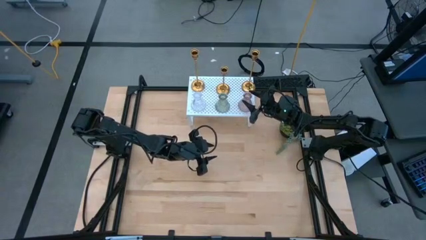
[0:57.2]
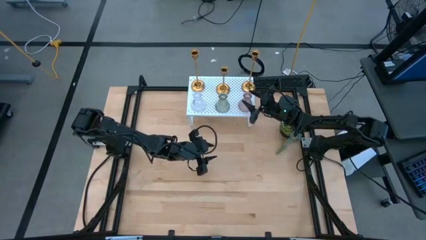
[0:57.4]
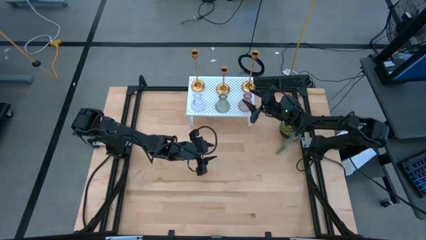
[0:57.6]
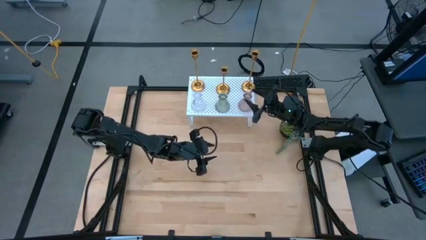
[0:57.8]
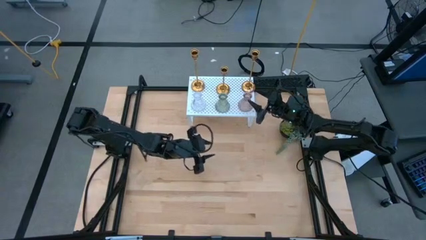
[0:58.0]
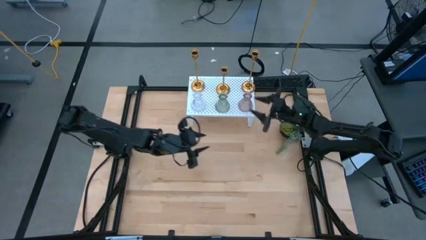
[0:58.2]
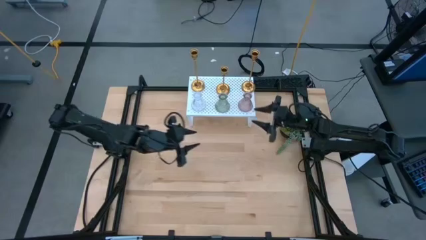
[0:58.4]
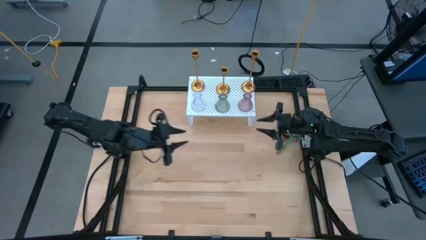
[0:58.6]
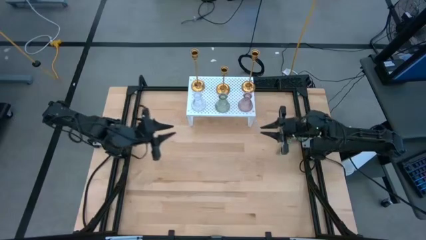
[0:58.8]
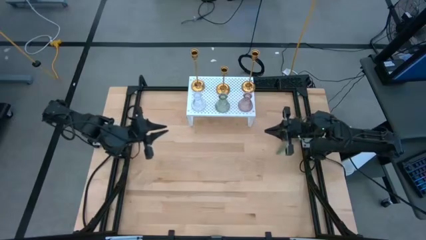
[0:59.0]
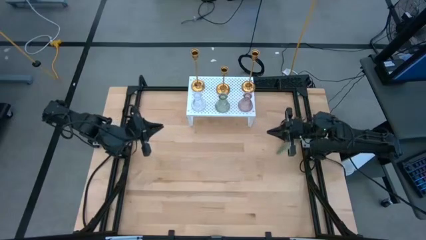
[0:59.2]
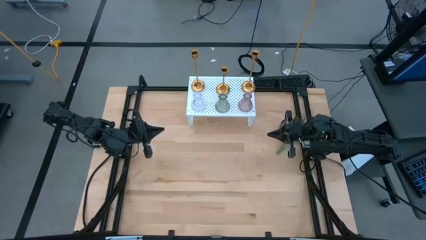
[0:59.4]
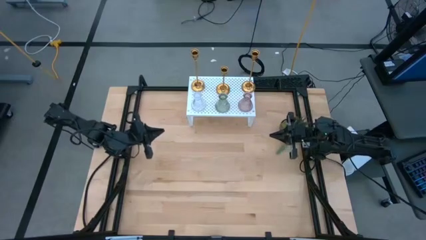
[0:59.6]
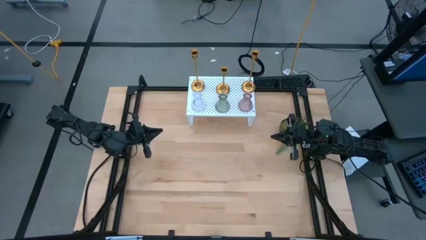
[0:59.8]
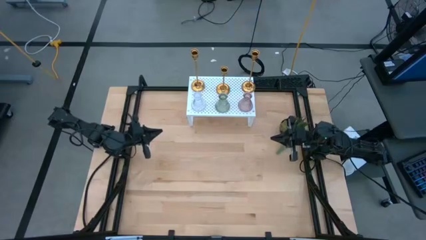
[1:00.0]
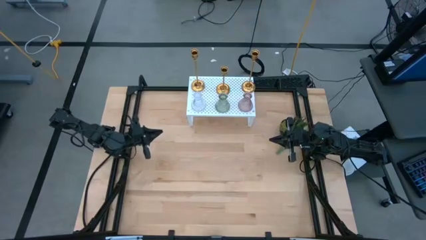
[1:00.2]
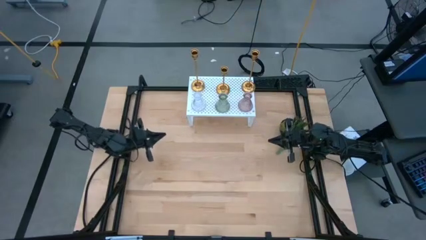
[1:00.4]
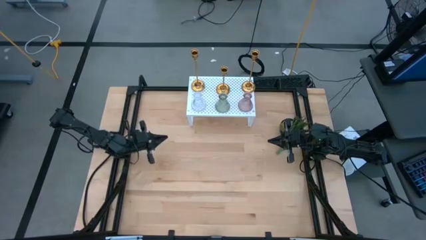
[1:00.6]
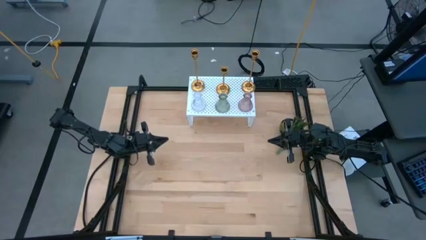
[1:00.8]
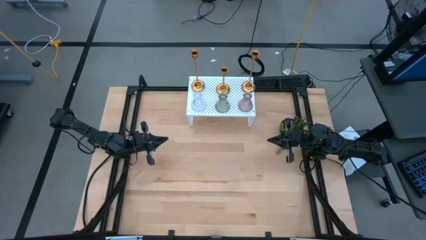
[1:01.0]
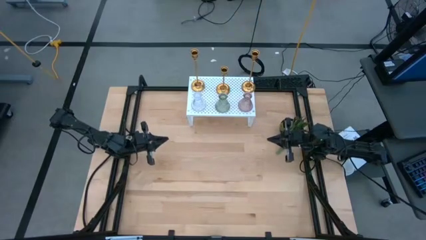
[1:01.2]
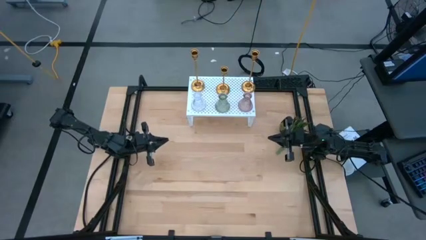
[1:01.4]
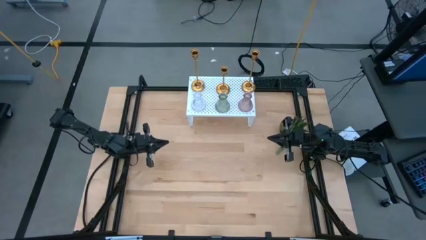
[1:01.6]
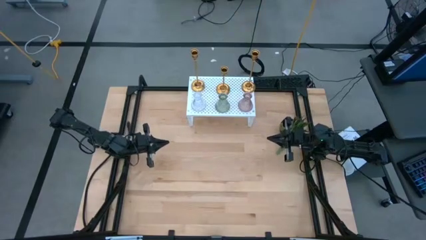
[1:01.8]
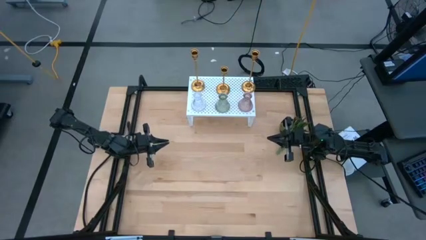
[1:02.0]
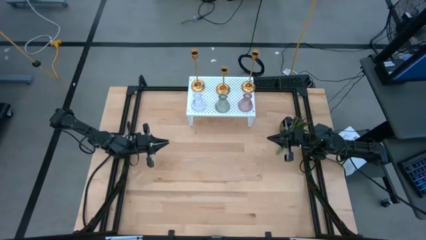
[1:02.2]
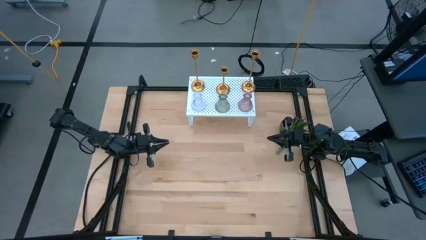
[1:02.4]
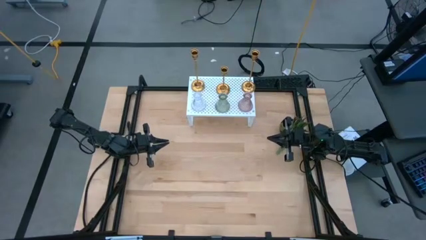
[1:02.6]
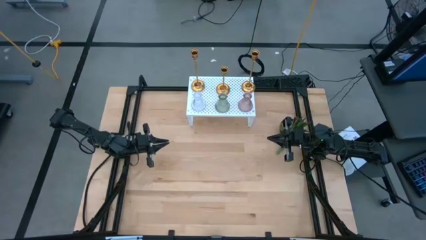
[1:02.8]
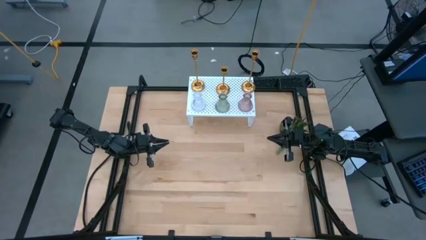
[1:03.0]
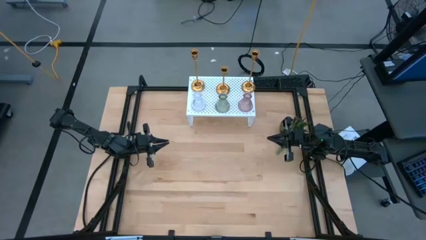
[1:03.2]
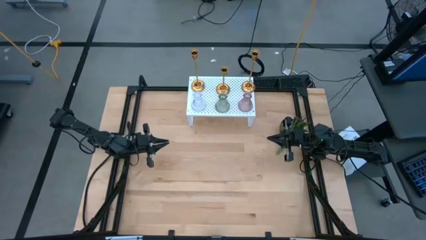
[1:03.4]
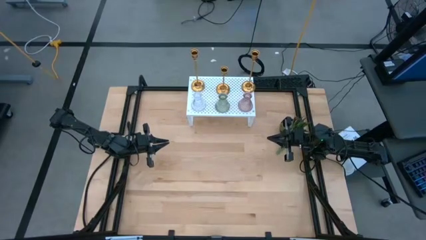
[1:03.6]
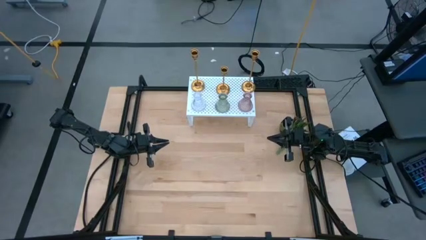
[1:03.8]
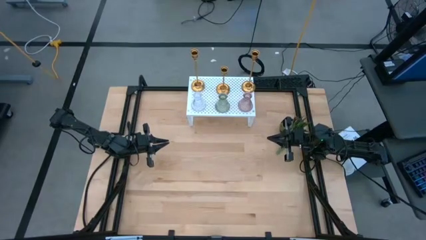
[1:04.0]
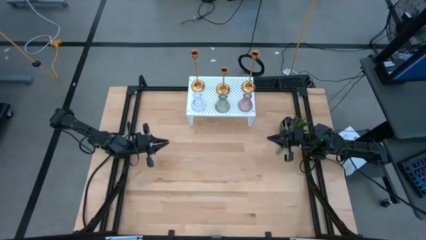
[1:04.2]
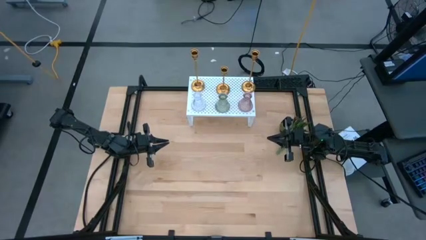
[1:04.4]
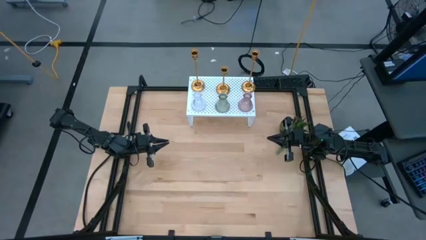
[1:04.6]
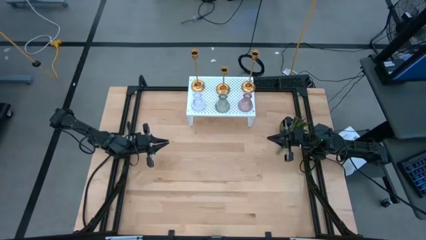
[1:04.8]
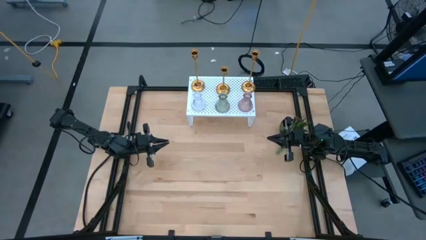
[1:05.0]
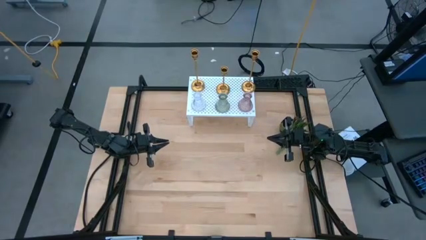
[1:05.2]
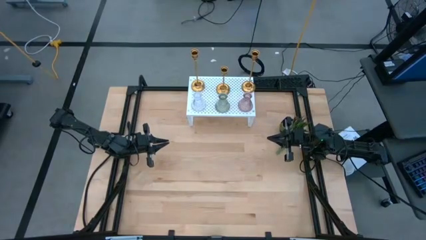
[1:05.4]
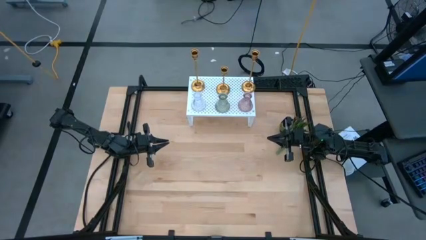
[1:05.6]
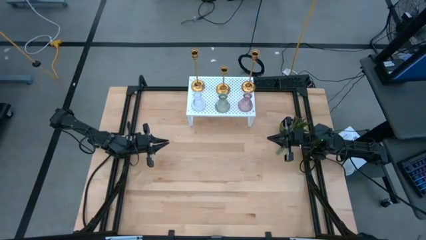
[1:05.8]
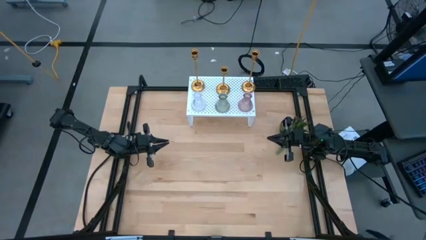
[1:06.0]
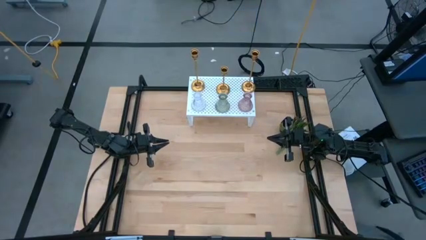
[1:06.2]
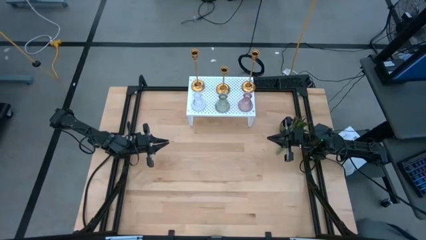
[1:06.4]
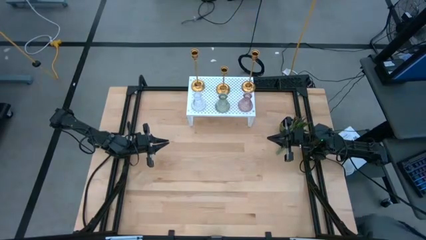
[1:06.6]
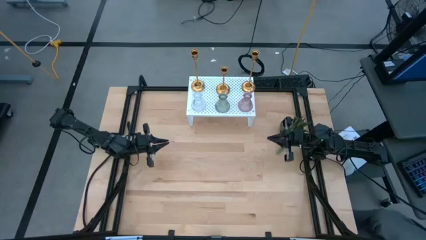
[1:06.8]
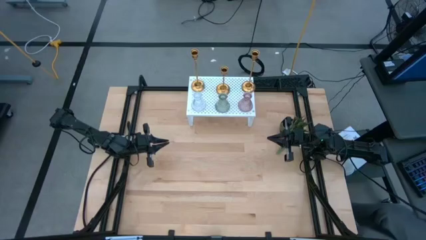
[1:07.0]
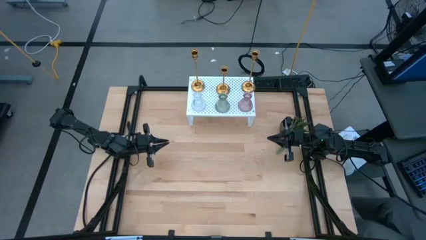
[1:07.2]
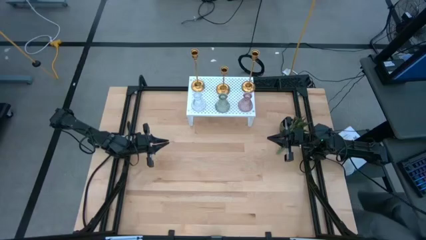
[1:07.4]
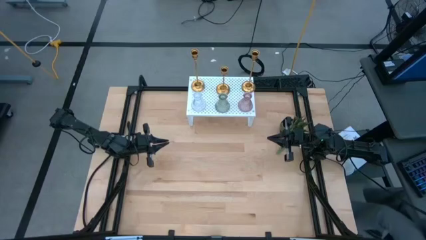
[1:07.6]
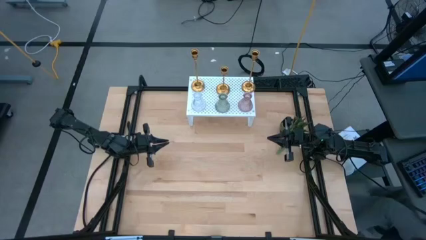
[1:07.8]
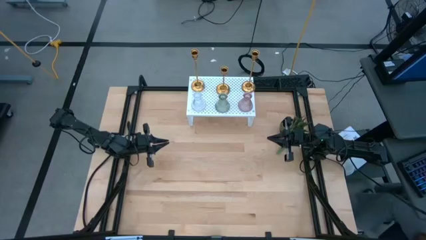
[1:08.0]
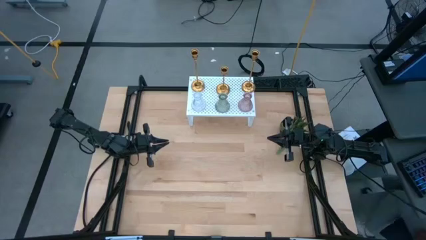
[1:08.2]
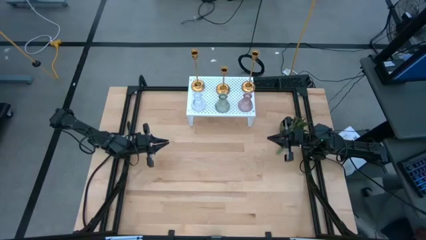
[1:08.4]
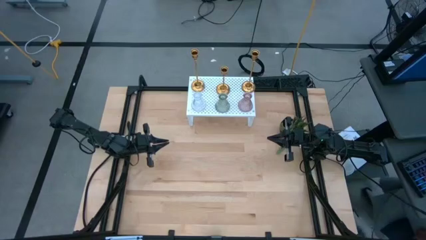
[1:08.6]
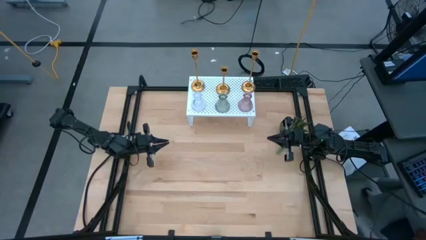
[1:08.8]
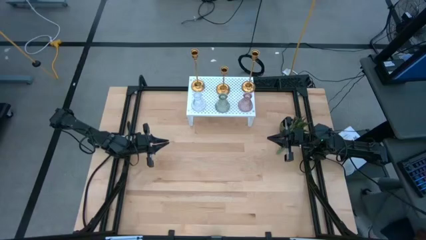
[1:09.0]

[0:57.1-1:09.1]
Task: Pick & Place candle stick holders
Return to Home Position

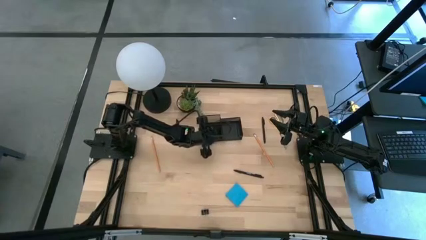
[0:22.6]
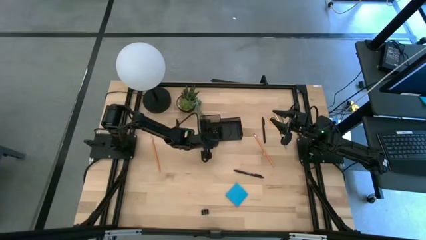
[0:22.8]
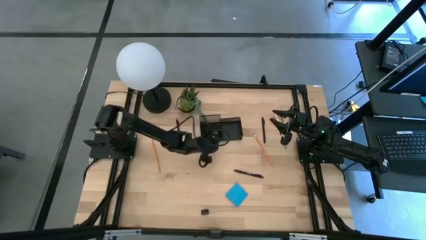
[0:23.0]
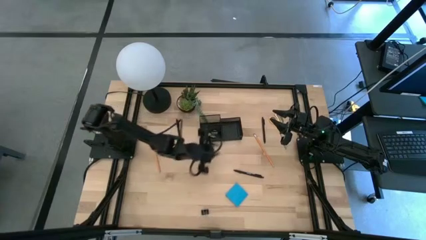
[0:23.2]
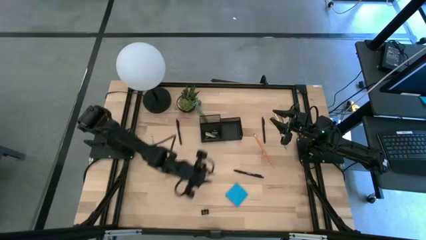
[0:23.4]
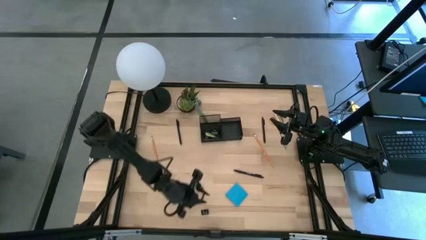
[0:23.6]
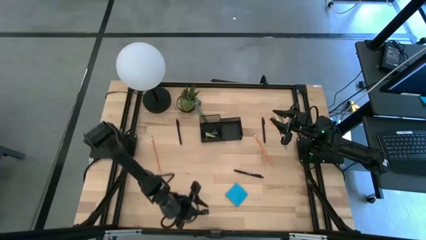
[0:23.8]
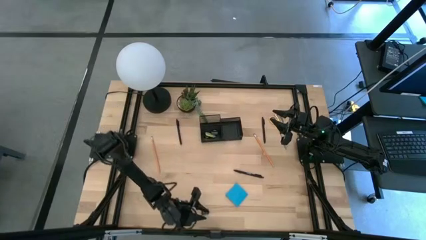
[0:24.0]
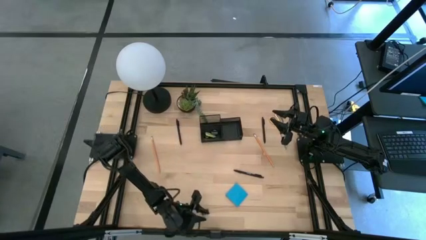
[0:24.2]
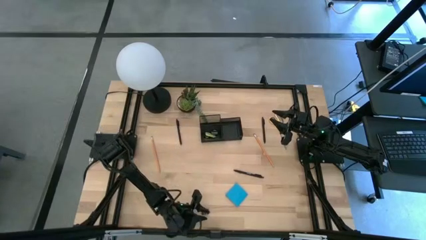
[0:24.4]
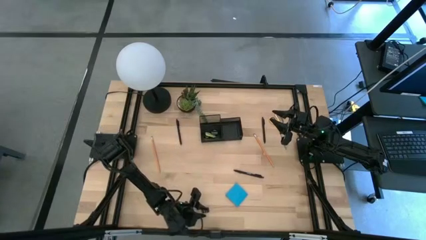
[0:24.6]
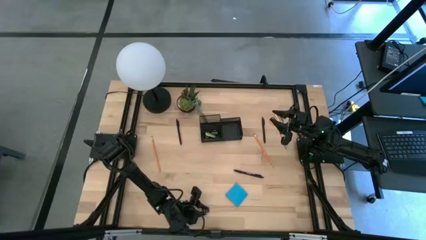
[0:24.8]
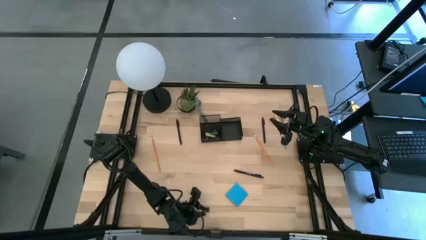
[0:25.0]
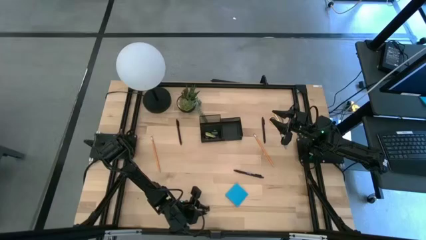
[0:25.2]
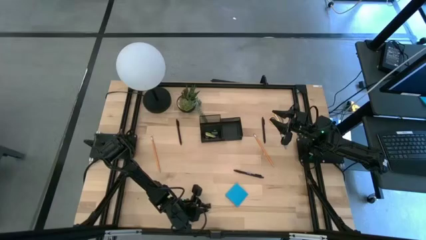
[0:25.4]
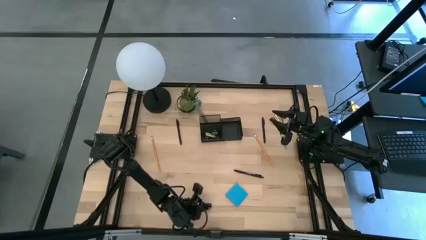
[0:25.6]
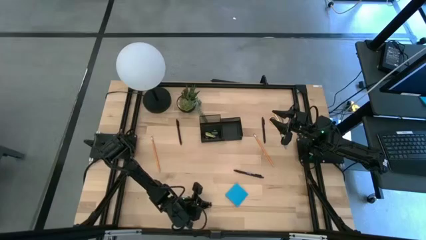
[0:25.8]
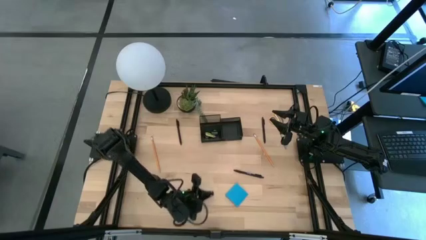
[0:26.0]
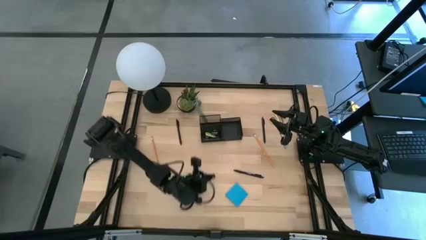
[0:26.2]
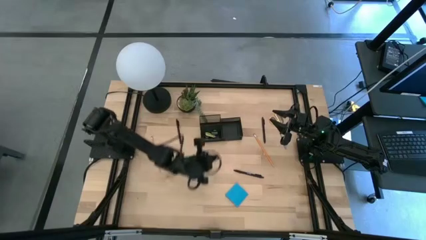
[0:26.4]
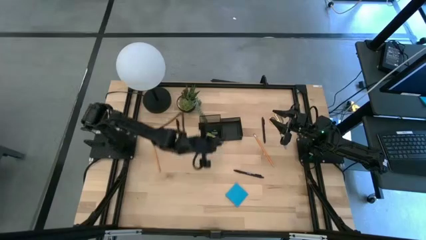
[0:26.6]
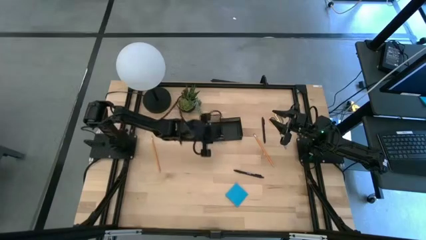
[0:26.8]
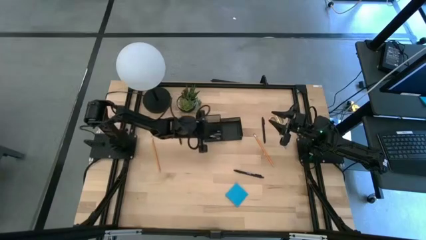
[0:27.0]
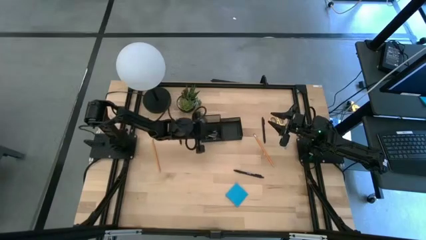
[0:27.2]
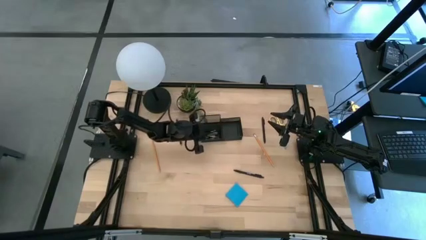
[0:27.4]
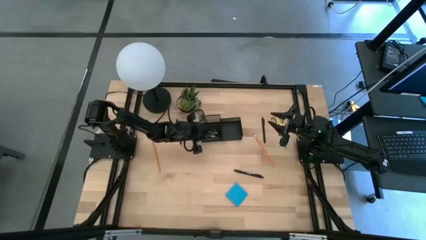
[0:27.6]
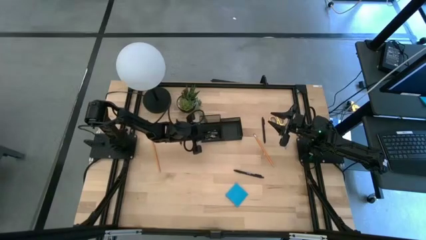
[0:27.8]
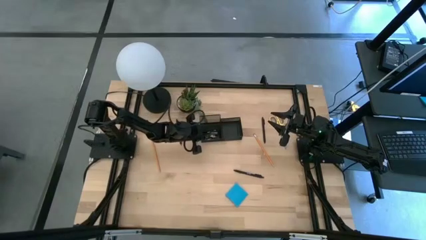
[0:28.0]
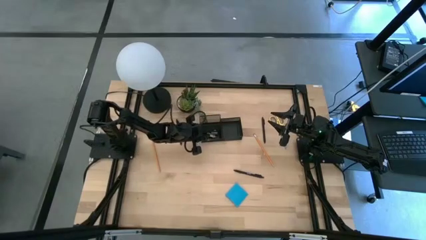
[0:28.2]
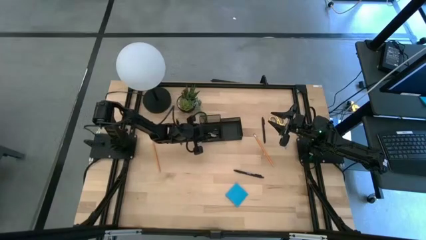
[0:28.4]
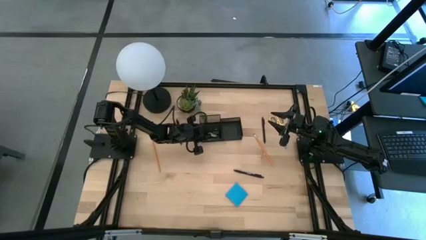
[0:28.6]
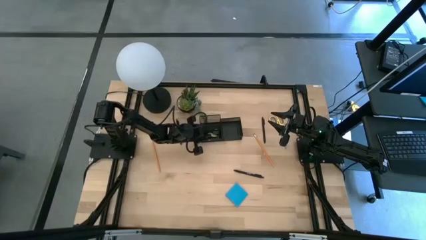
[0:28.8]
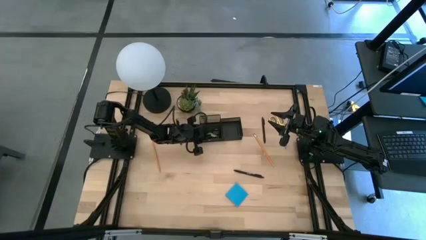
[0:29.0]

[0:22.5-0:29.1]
Task: Pick and place office supplies into organizer
Put the black binder clip into the desk organizer
